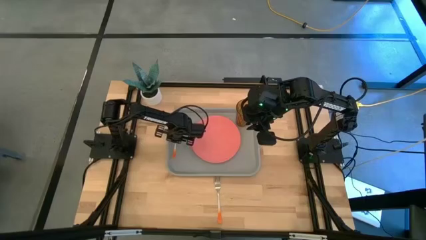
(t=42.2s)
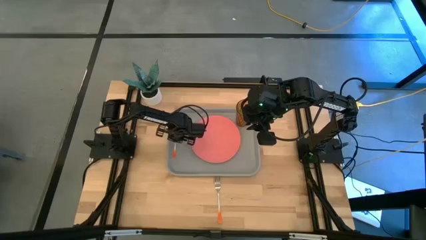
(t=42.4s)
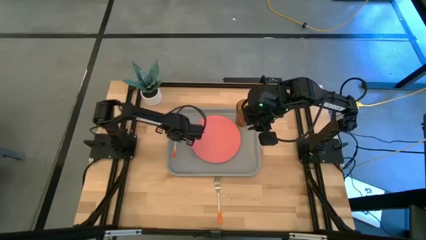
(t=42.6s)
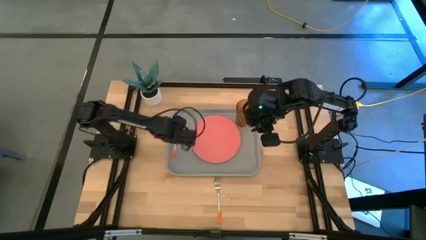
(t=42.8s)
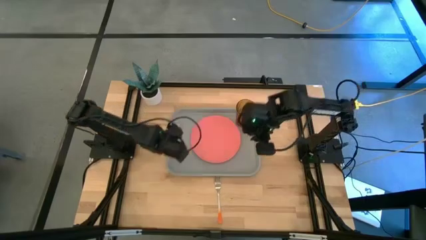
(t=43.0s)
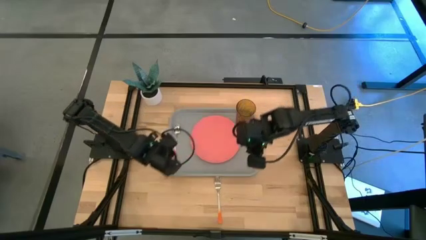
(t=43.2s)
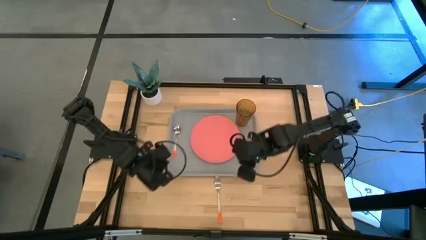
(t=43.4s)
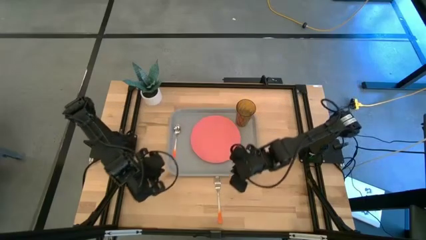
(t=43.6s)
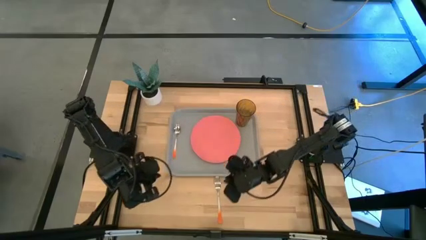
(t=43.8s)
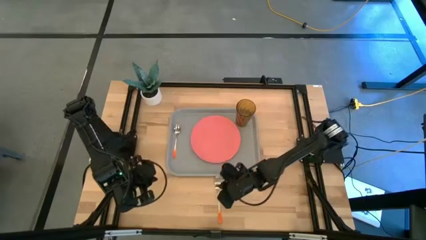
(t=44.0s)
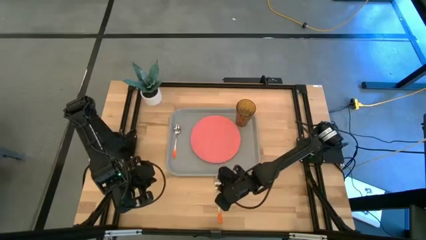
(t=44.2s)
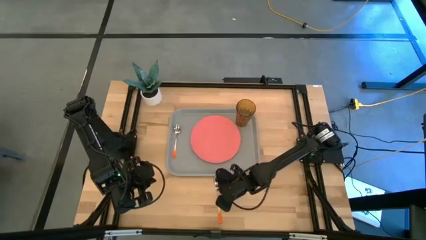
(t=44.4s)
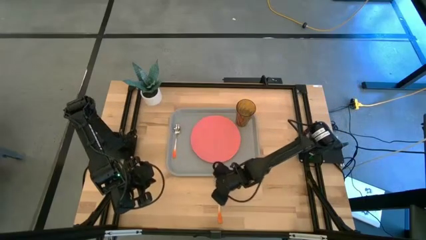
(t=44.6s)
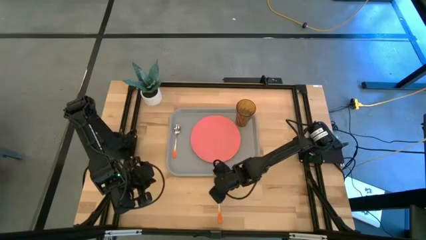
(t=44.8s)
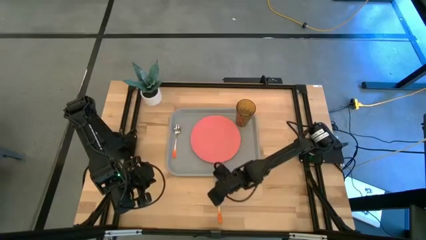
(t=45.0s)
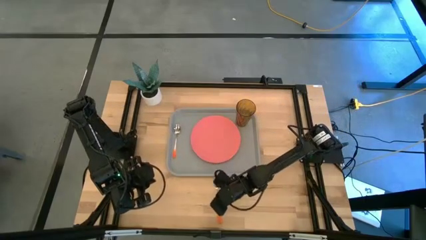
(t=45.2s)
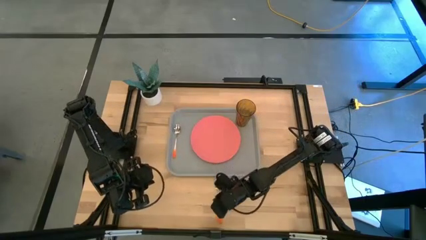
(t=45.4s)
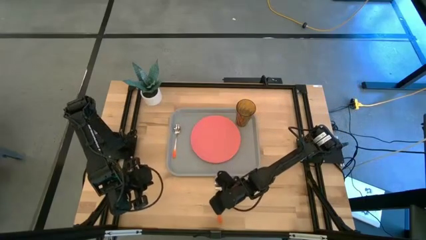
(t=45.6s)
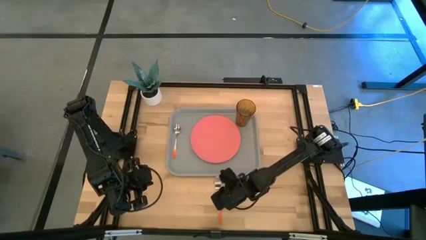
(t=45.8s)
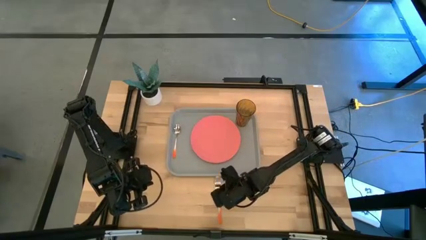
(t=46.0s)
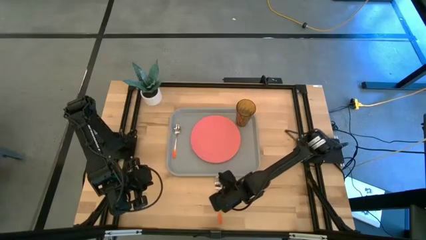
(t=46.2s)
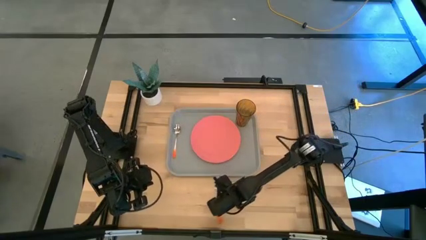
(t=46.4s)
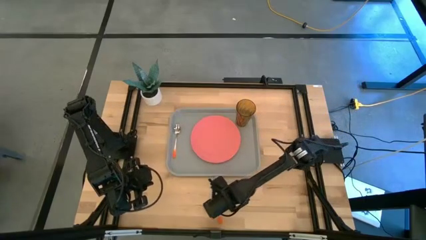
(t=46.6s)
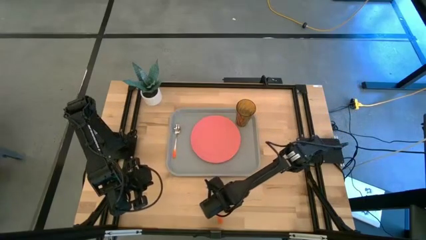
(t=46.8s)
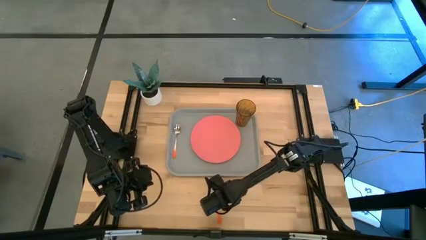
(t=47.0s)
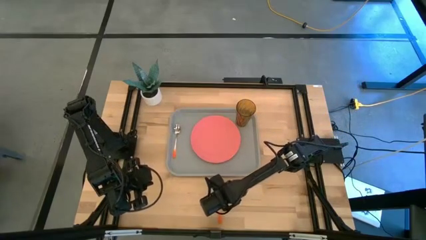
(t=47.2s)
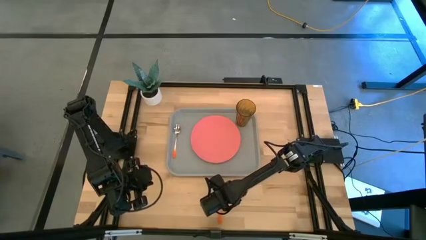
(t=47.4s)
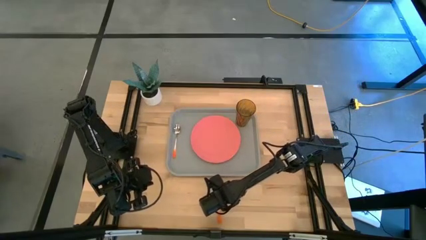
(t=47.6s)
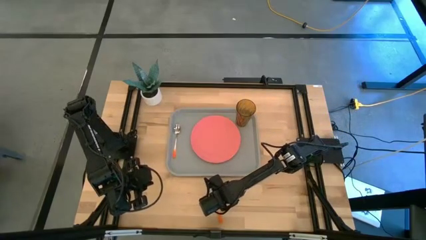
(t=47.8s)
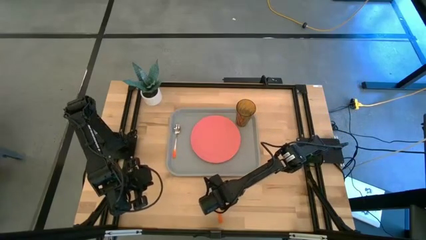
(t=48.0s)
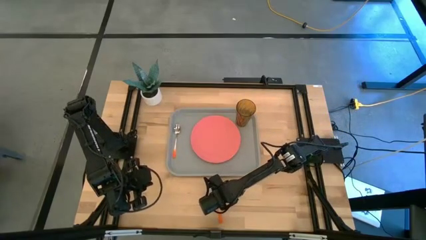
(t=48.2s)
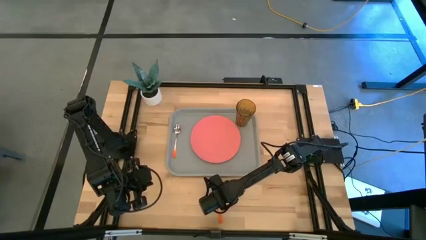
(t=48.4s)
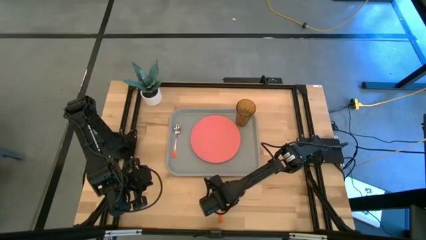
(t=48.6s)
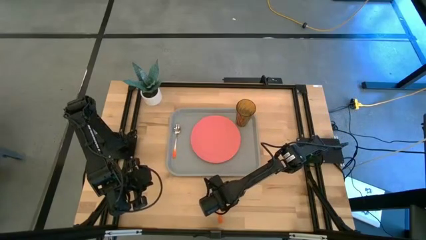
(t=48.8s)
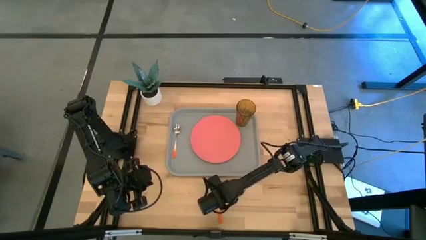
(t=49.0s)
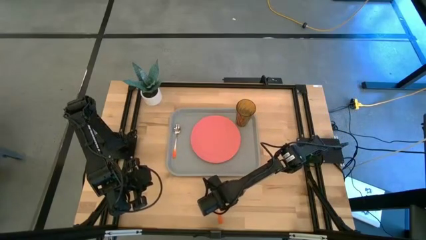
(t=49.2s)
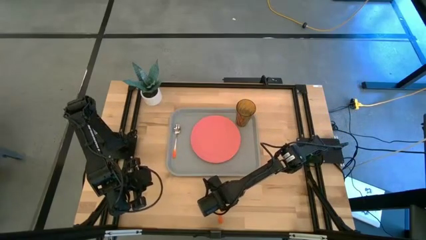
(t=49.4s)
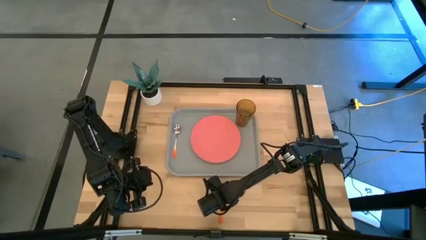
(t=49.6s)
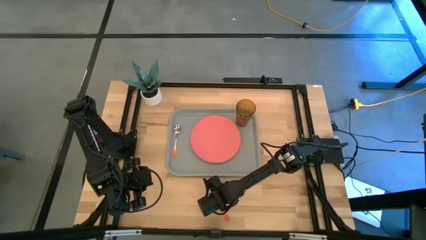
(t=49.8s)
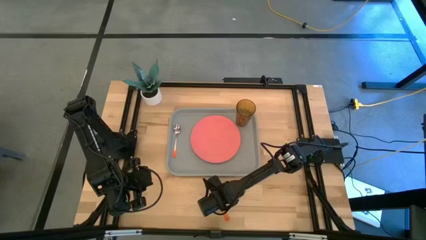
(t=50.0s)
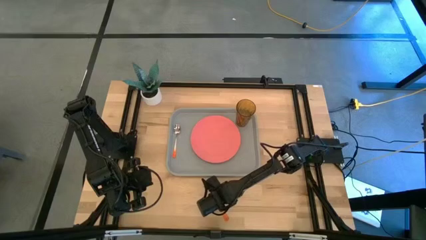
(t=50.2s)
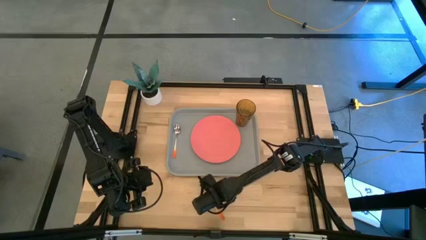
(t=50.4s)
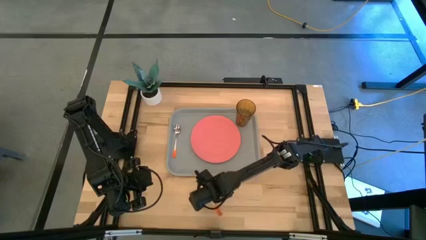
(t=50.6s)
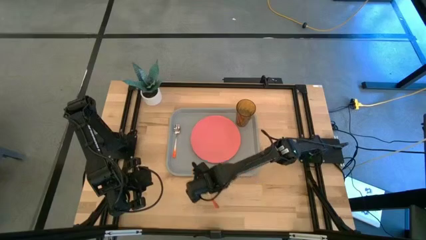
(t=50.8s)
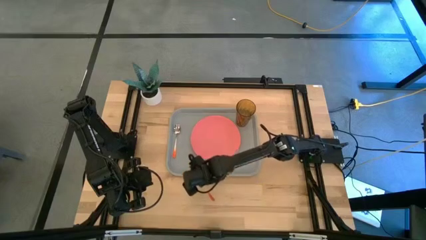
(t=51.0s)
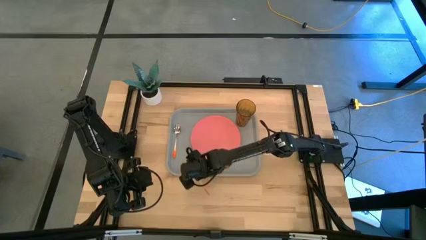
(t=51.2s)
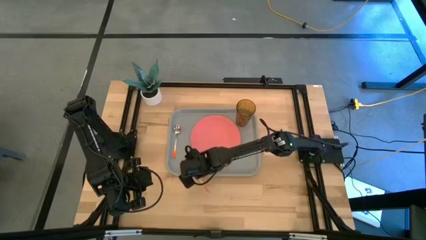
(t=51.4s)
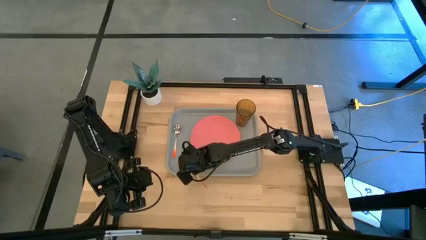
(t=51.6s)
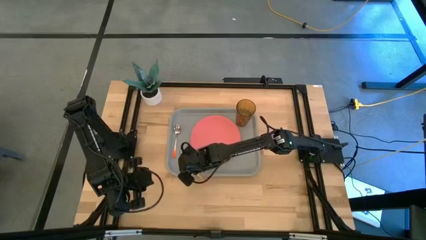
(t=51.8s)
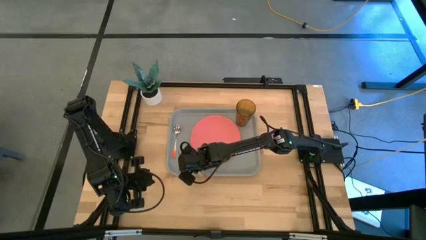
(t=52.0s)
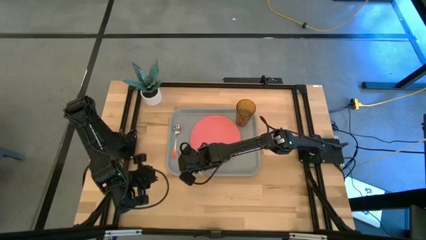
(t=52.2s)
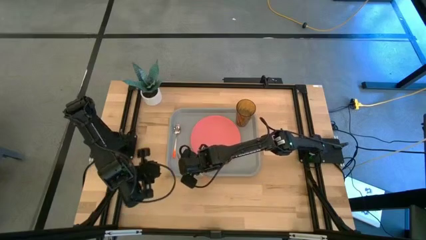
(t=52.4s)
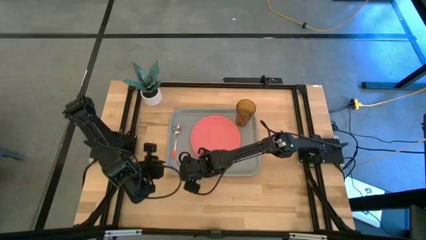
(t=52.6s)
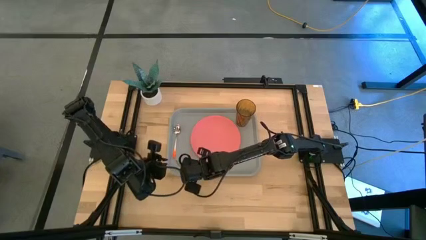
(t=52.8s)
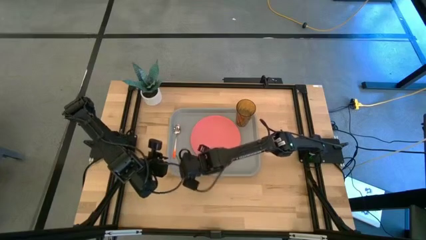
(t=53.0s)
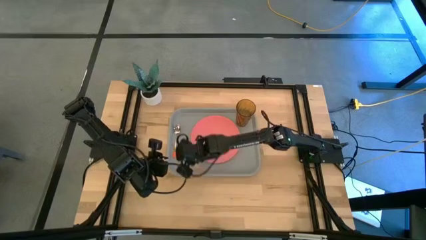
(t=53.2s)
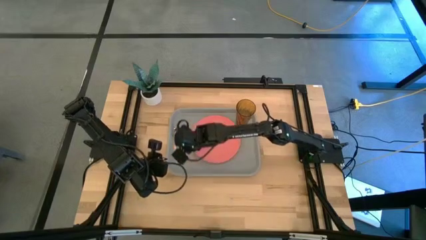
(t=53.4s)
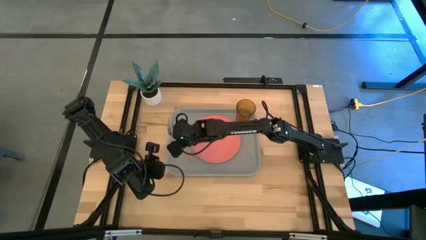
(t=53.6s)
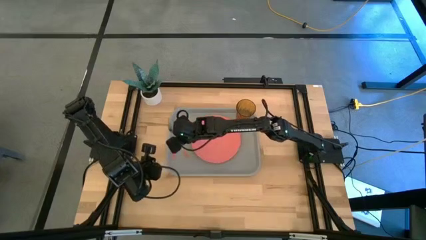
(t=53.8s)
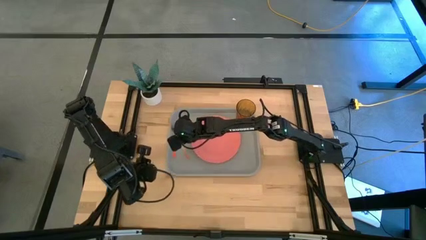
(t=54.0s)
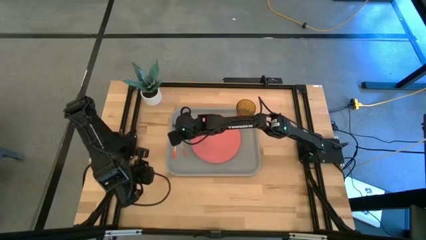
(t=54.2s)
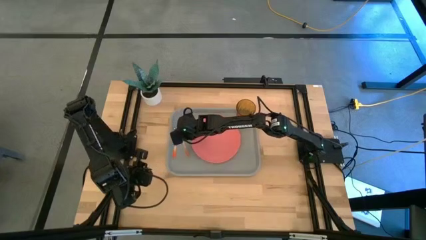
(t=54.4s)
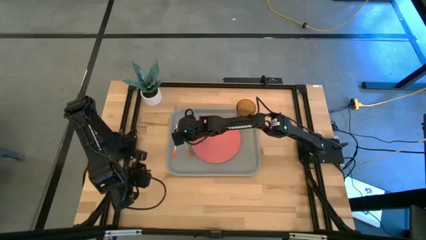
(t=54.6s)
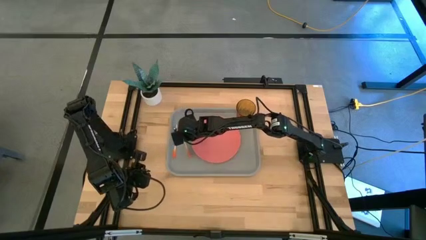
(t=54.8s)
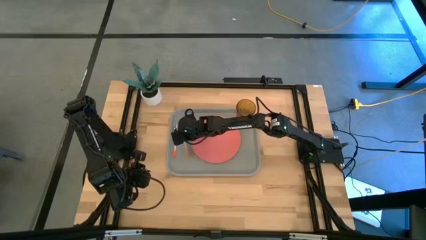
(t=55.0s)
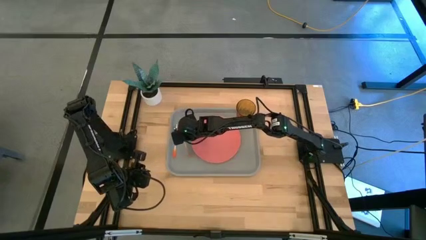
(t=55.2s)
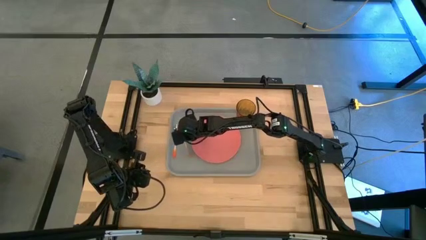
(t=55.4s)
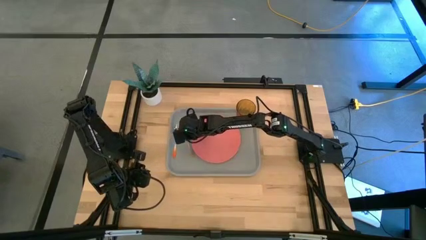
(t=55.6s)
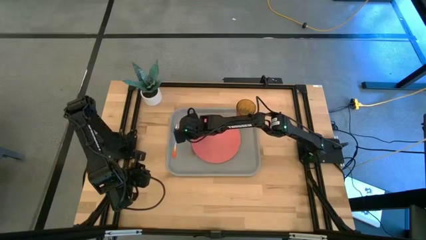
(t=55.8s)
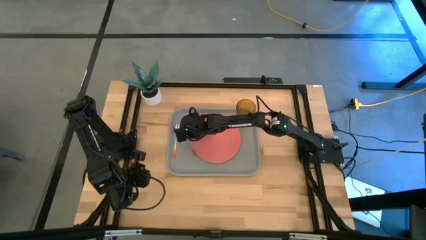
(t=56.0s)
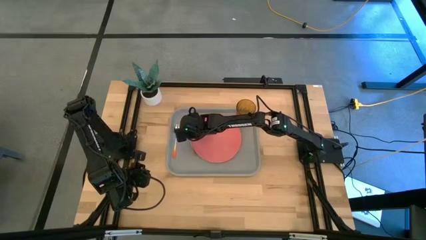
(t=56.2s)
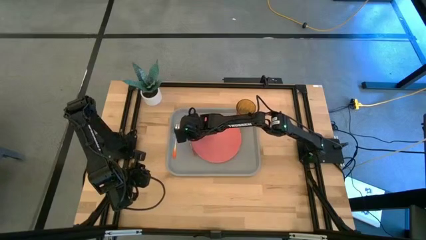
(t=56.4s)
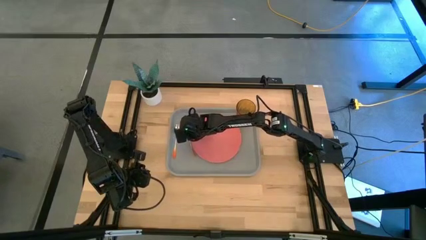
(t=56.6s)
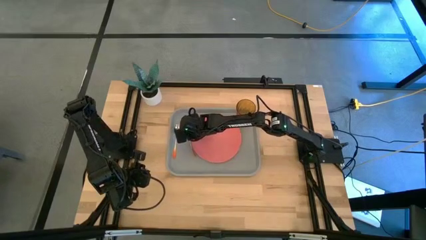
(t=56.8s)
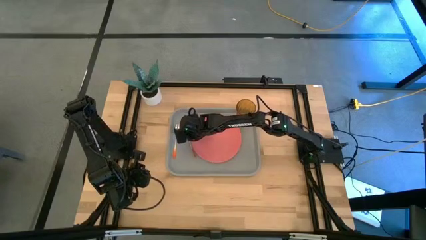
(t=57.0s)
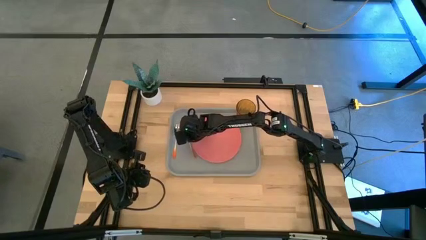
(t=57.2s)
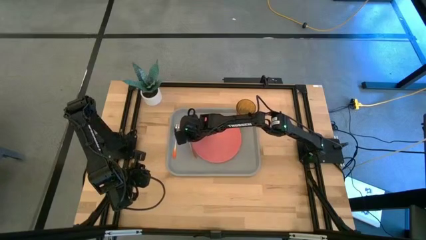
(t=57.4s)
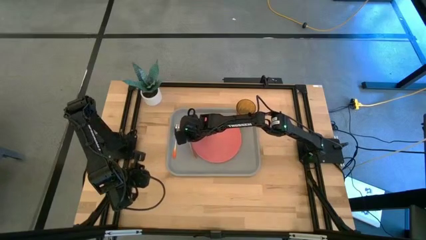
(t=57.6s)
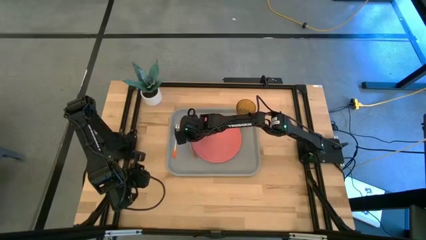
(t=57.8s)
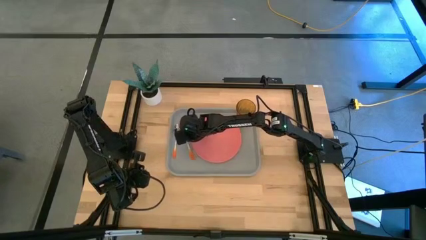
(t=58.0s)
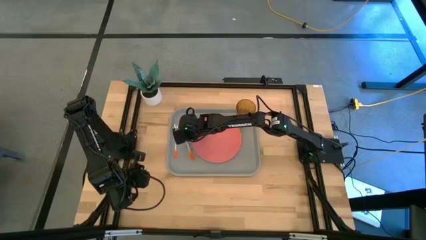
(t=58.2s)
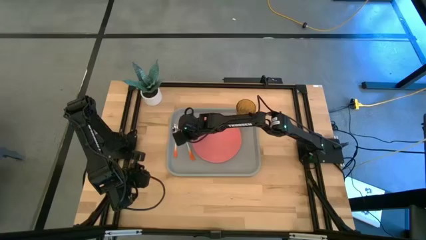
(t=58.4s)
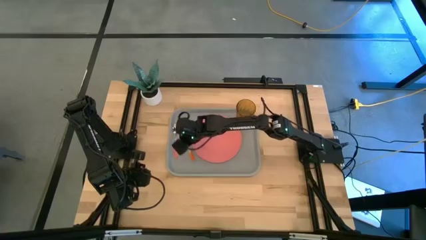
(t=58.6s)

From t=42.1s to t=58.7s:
Task: Pick and place plate/cup/fork/spoon on tray
Put the fork beside the orange spoon on the gray tray
